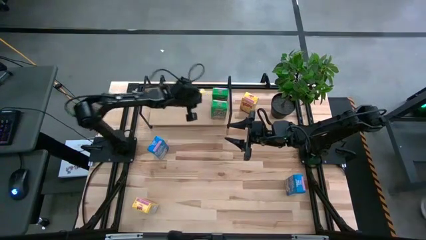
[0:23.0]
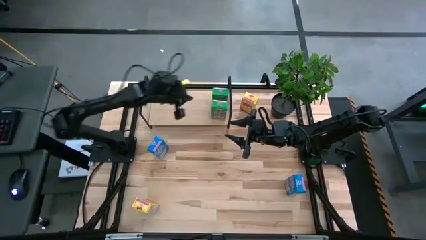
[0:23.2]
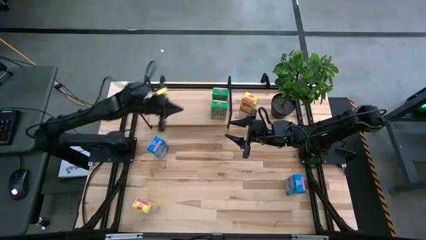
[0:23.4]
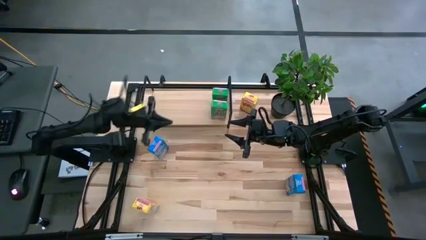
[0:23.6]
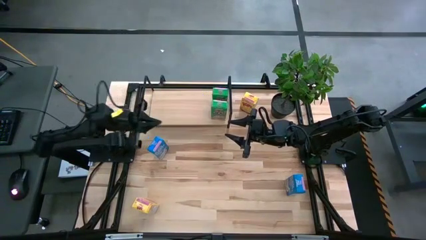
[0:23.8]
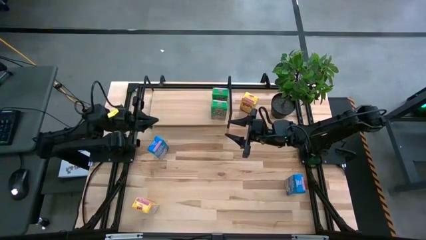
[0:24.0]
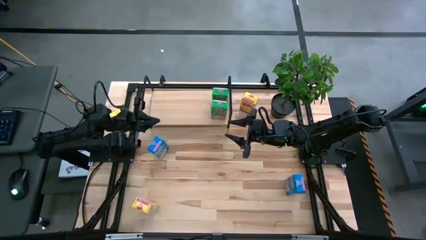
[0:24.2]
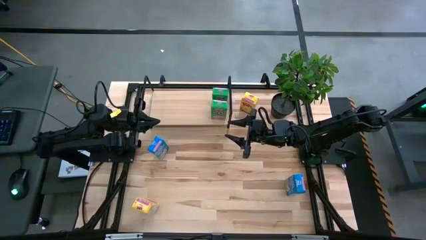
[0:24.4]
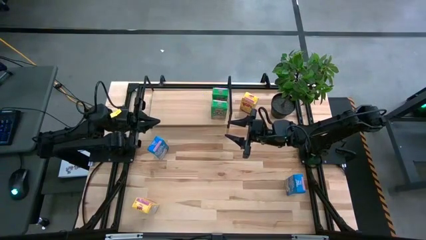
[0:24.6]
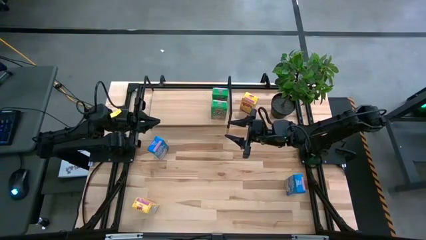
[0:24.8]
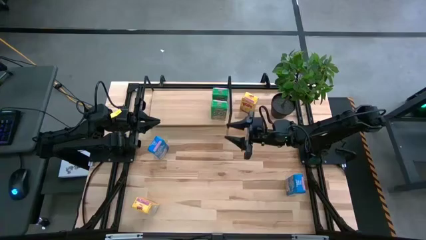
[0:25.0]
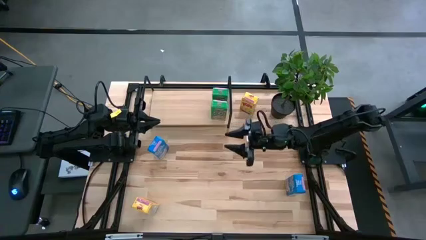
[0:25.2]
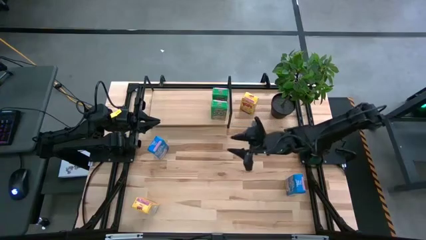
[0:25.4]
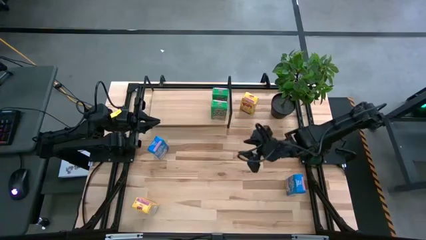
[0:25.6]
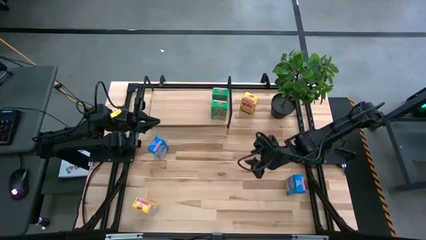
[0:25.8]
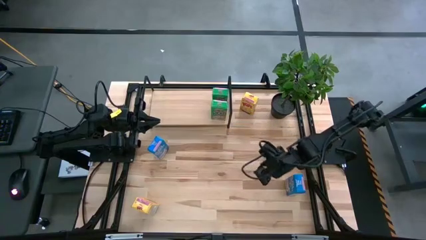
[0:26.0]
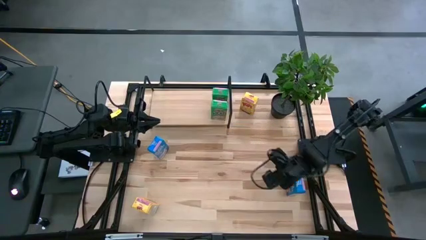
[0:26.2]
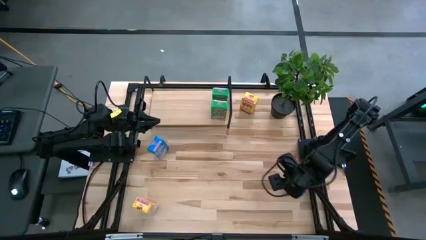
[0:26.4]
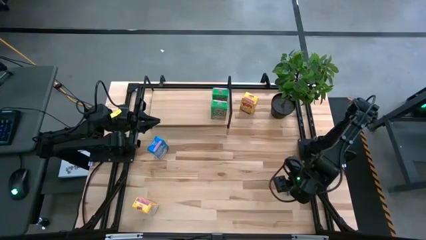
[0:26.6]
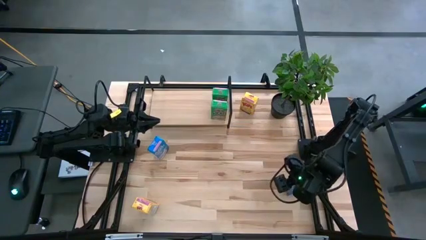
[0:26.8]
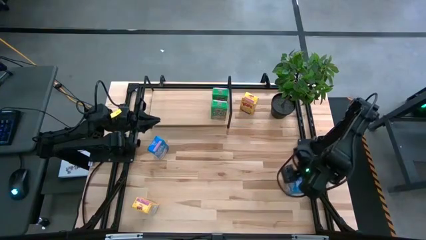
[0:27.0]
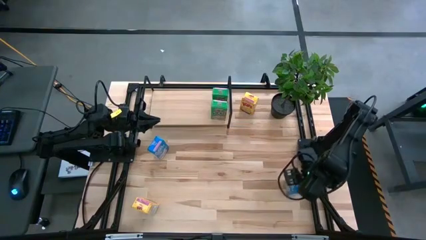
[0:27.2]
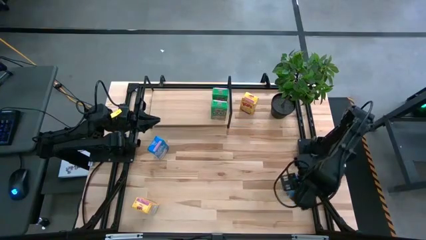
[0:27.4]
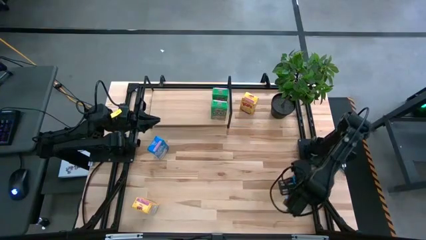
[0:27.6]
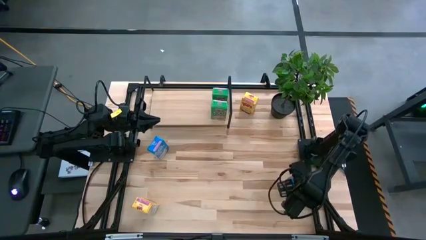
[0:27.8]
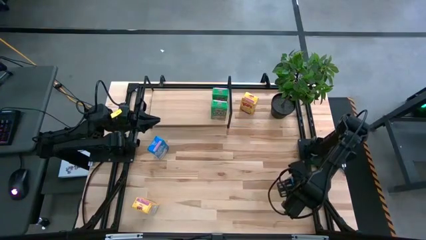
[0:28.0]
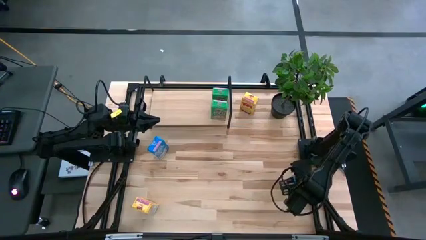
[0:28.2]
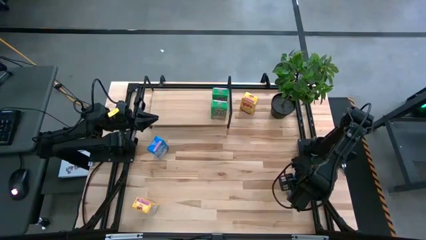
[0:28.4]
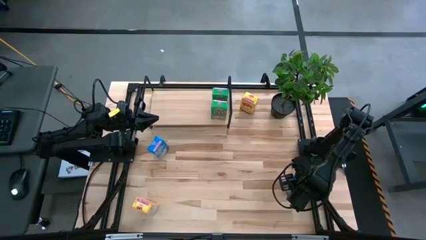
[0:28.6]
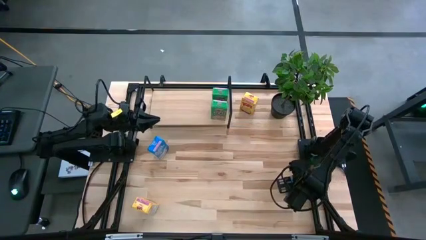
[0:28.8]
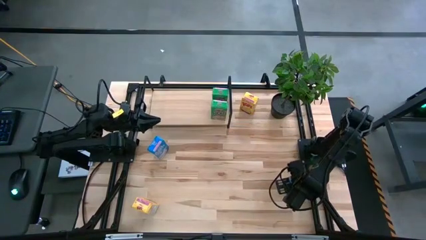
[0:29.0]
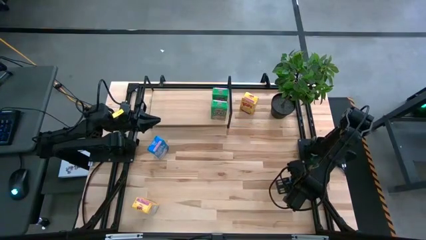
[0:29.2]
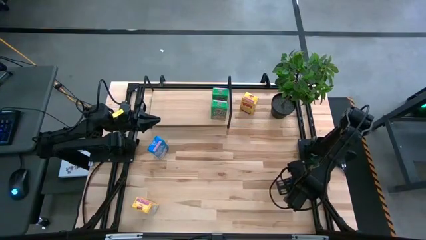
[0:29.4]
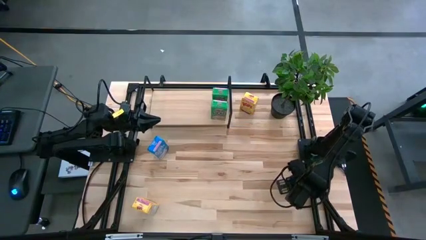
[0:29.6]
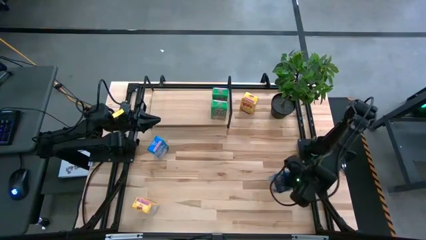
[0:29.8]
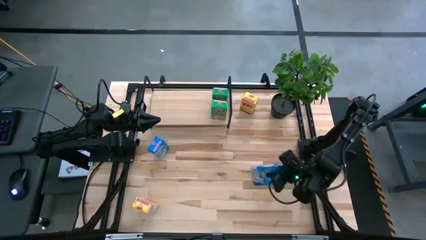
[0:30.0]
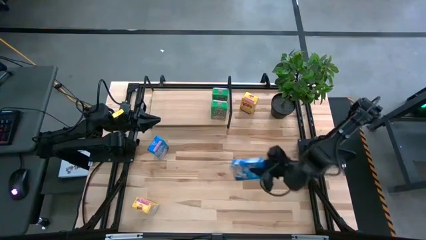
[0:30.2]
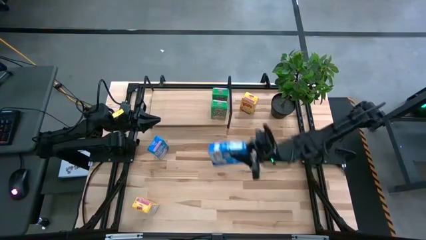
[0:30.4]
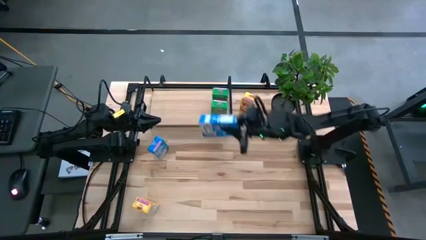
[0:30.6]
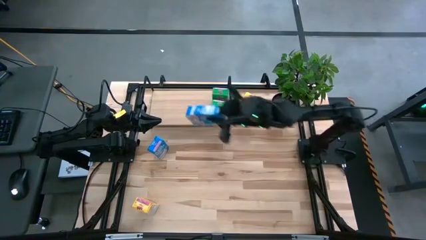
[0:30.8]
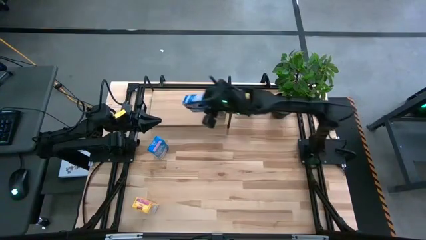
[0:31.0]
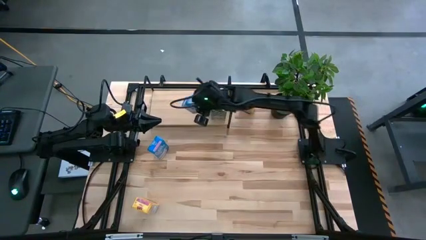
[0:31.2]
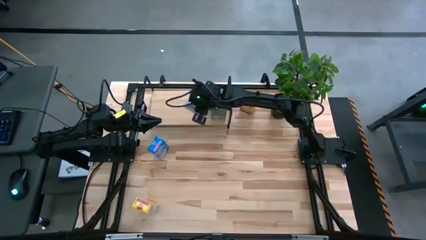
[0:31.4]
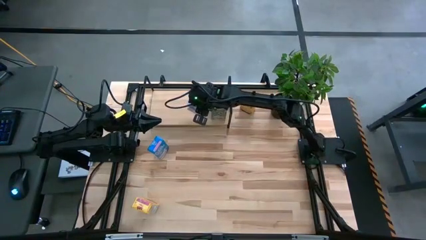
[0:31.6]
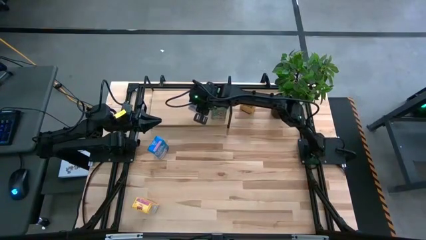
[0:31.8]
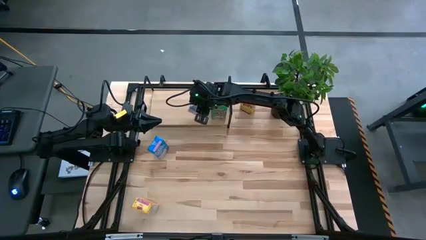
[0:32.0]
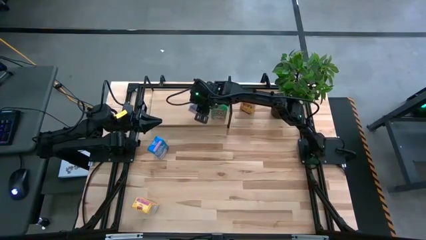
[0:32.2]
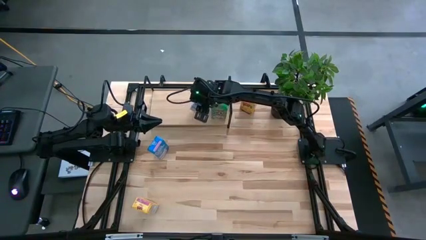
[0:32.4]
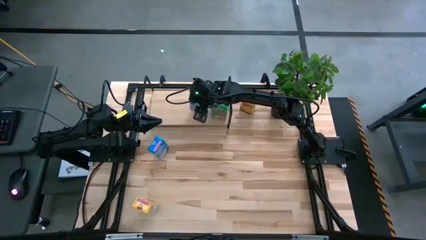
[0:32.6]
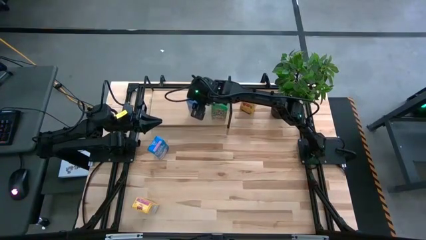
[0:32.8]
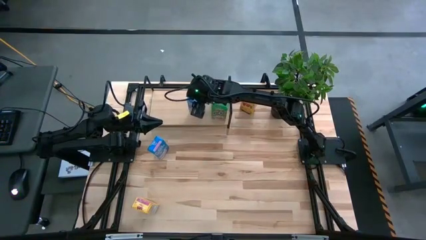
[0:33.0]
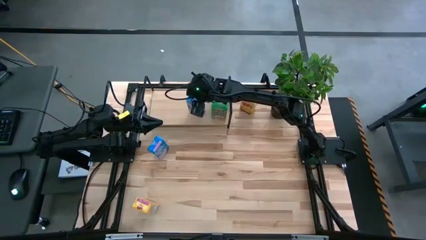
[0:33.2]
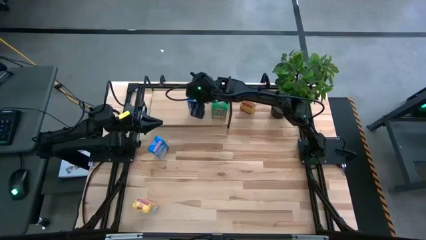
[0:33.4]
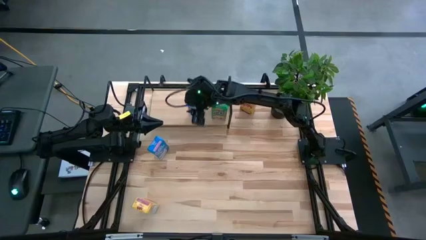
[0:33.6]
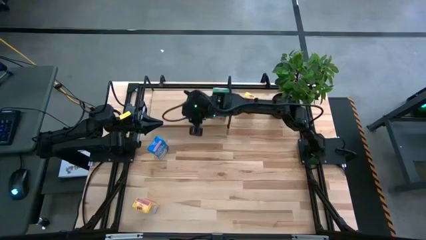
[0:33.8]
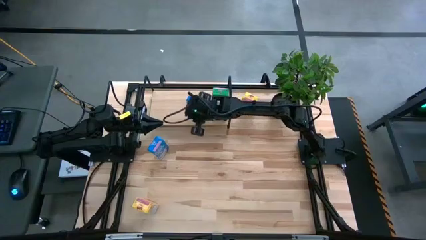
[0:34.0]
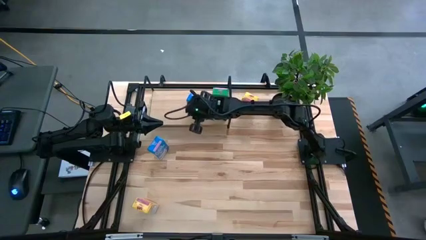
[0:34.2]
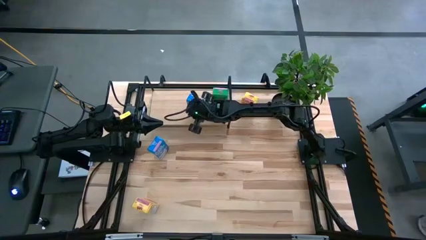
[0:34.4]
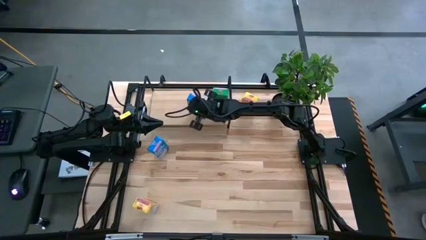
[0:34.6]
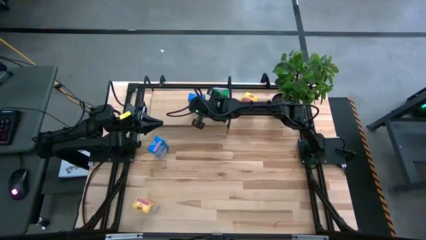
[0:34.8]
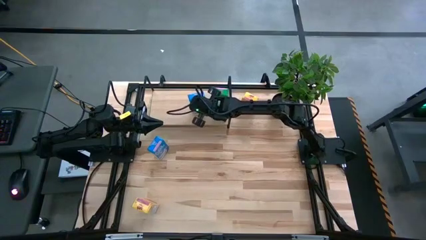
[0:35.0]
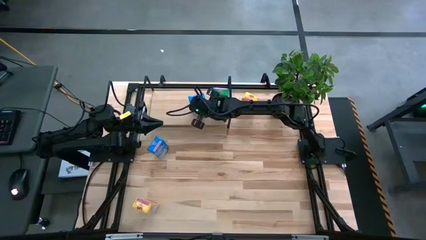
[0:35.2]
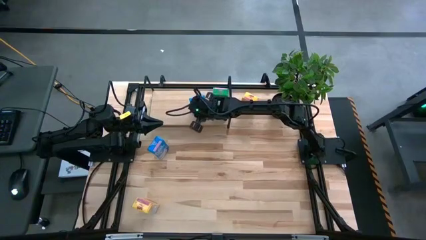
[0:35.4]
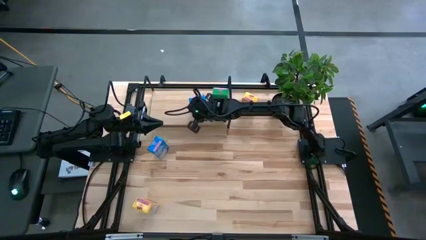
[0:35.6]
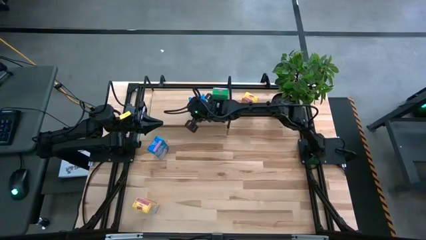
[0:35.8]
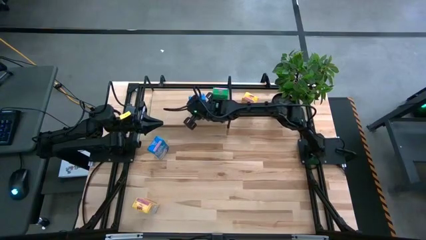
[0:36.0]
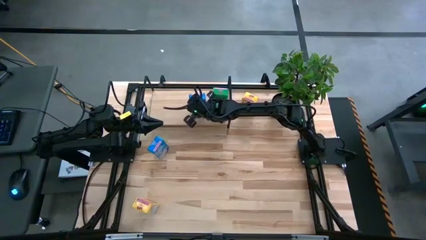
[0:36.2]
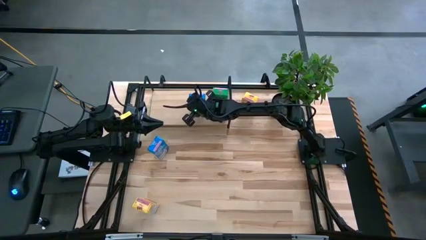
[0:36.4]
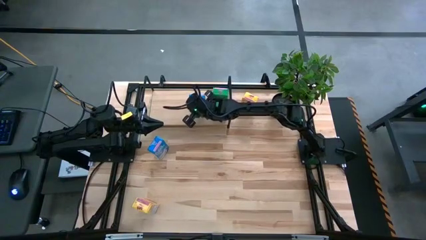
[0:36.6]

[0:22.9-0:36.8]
Task: Stack cereal on shelf
Put the right blue cereal box on the shelf
